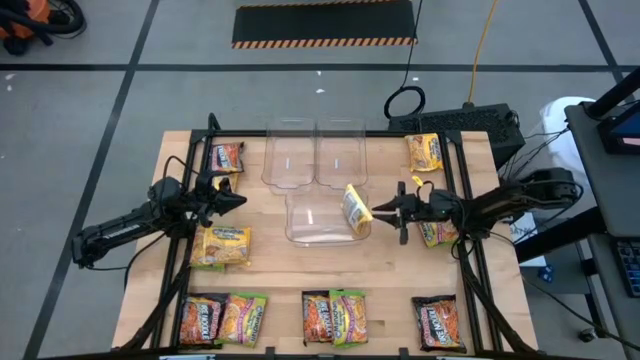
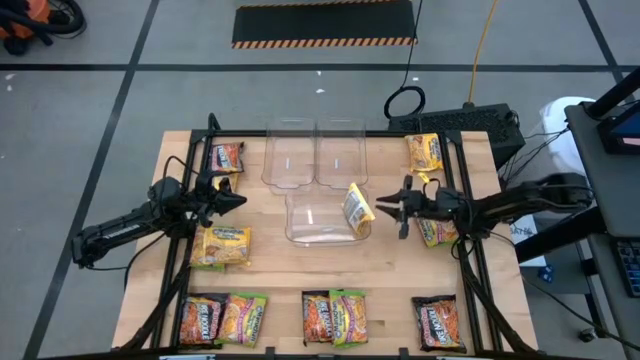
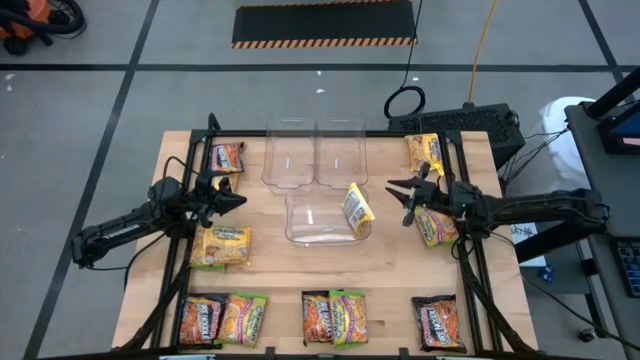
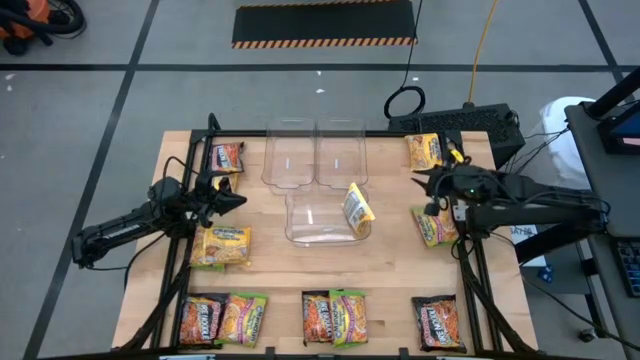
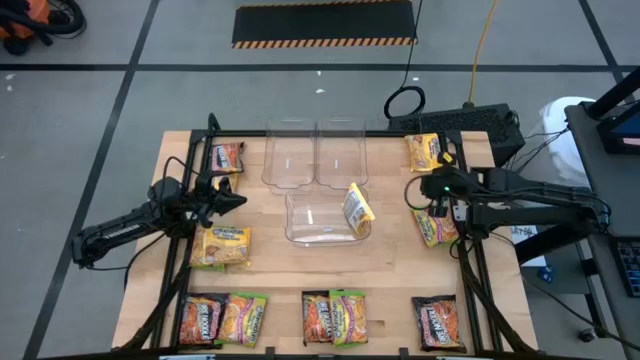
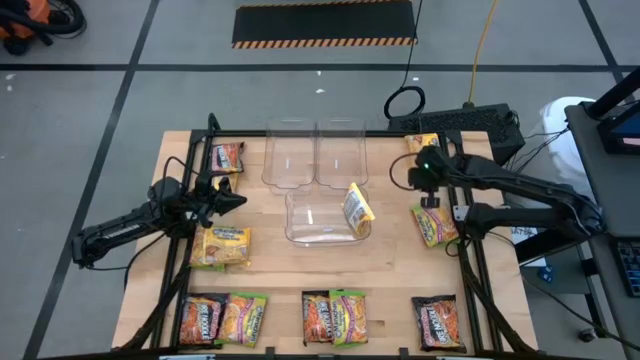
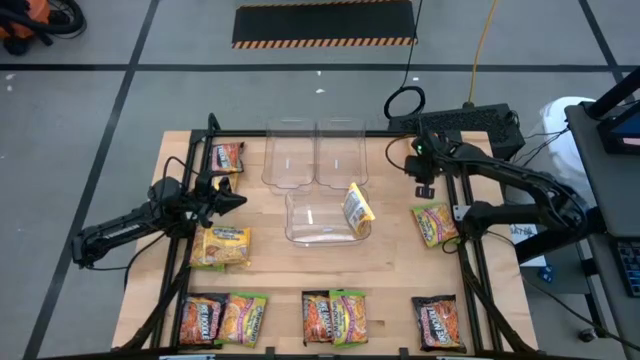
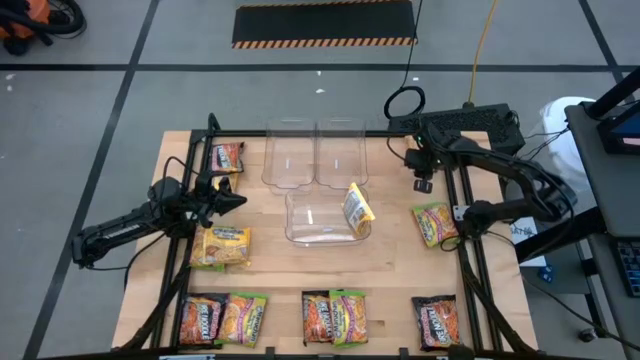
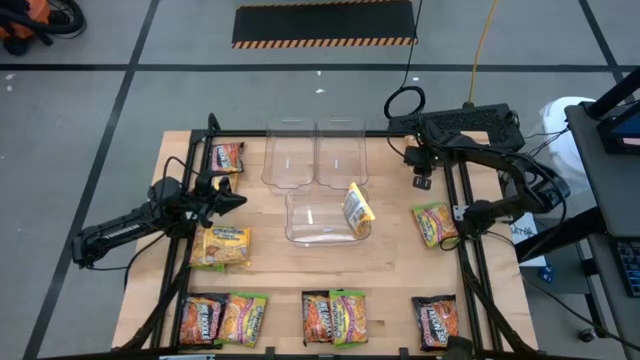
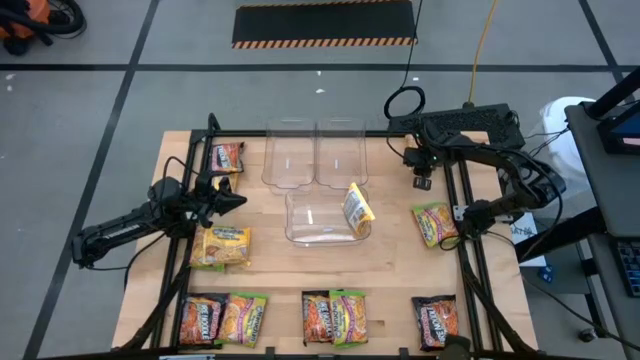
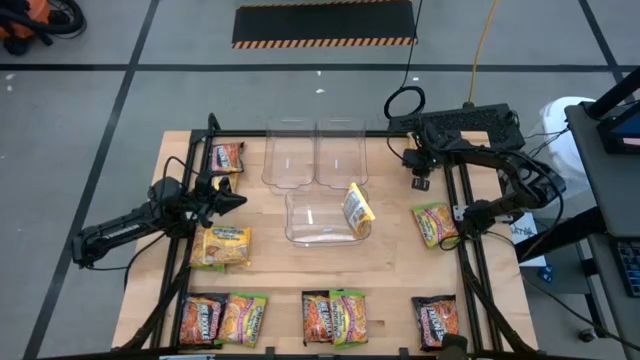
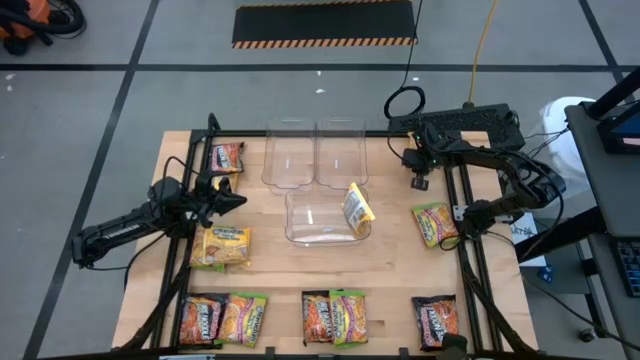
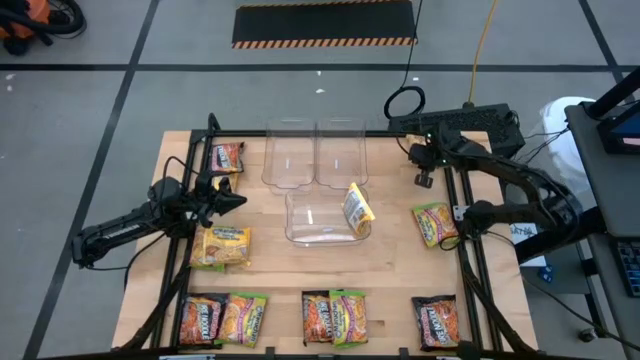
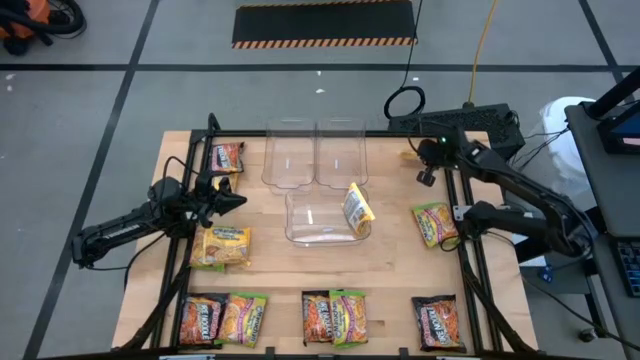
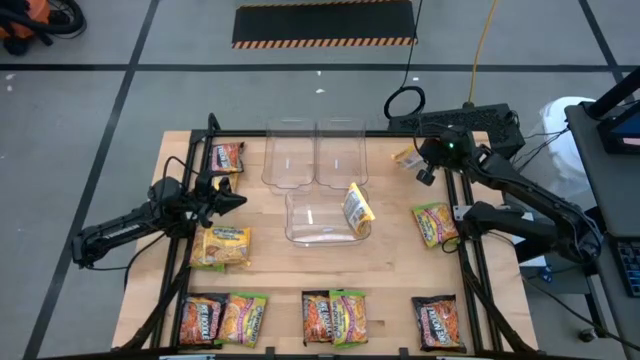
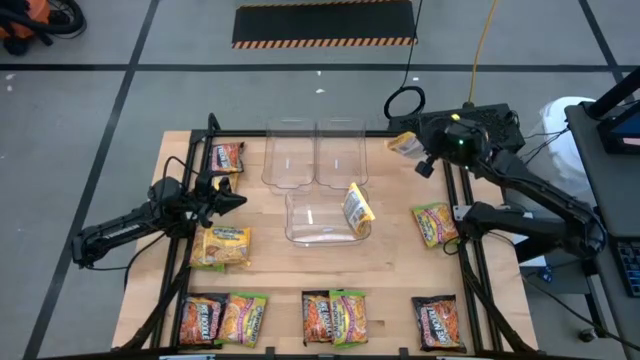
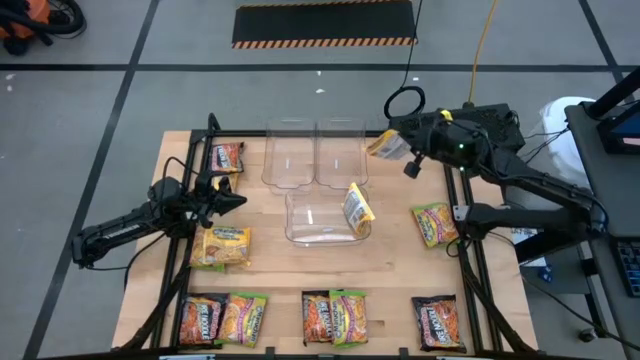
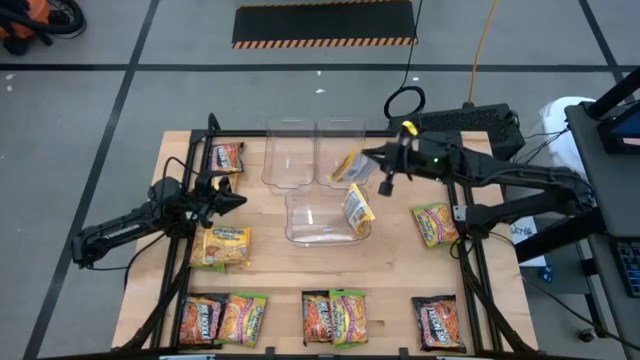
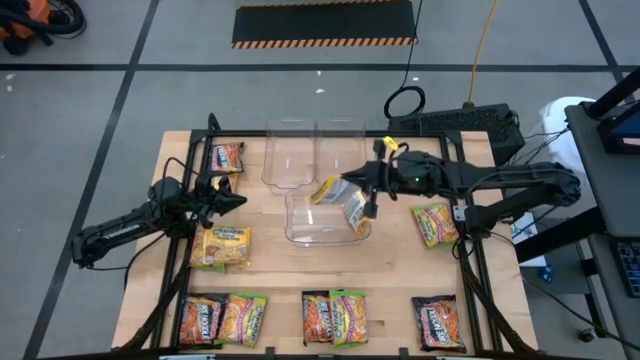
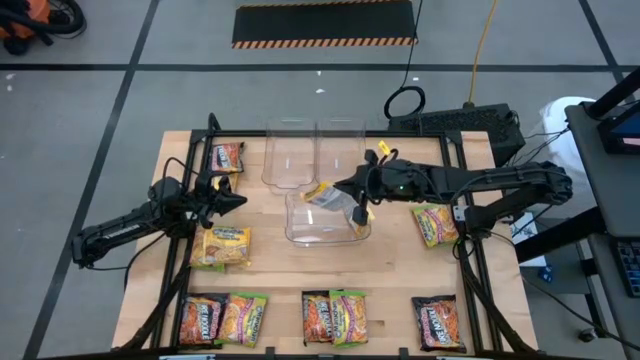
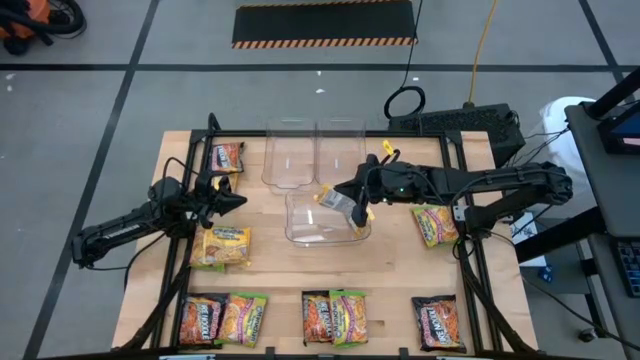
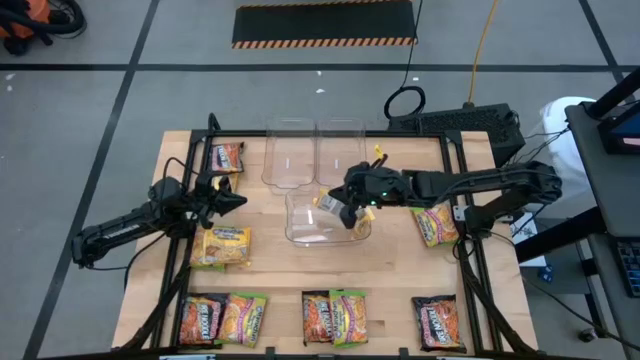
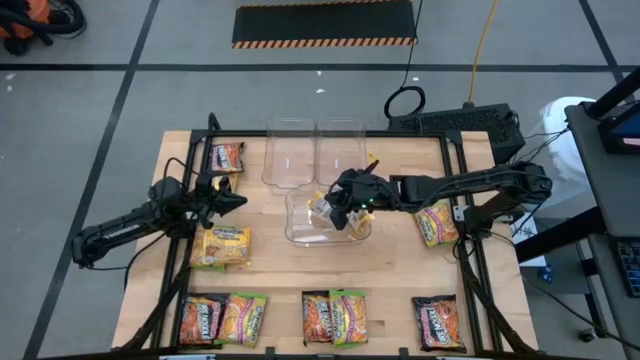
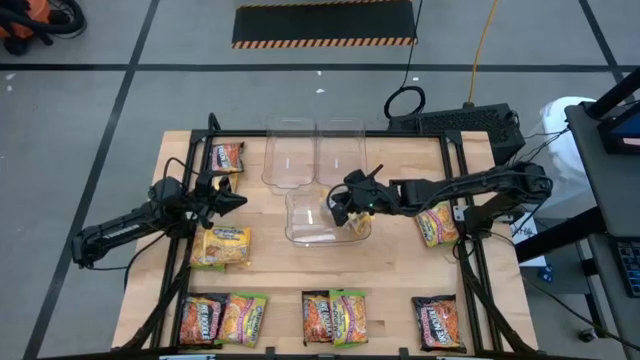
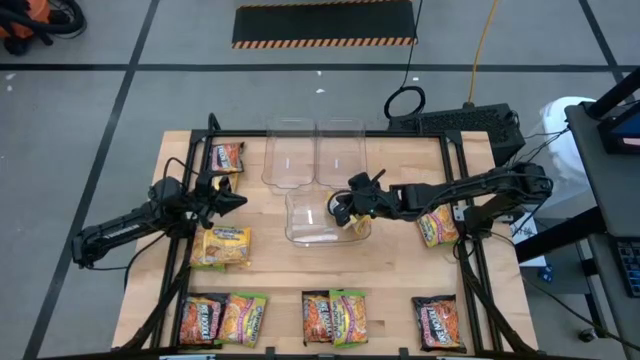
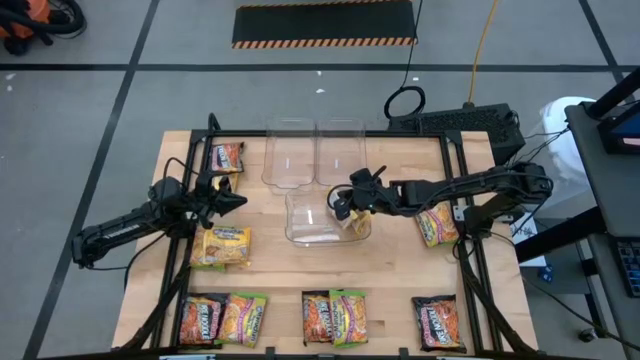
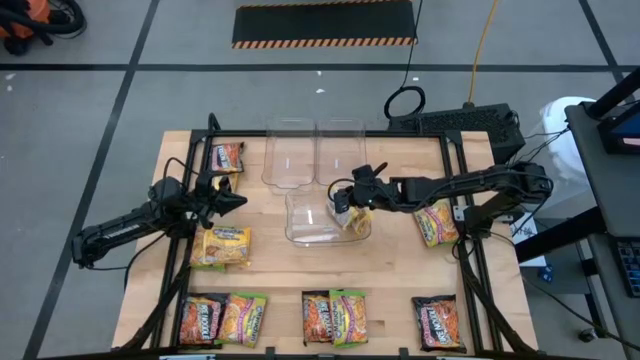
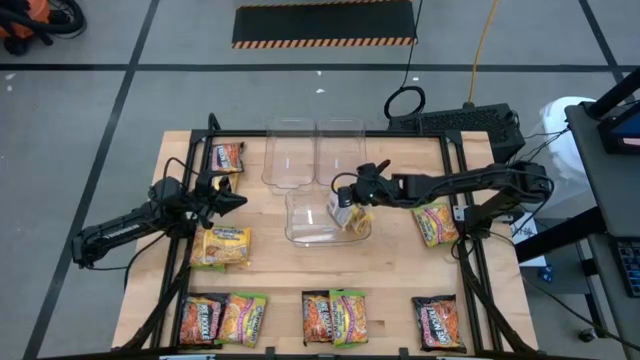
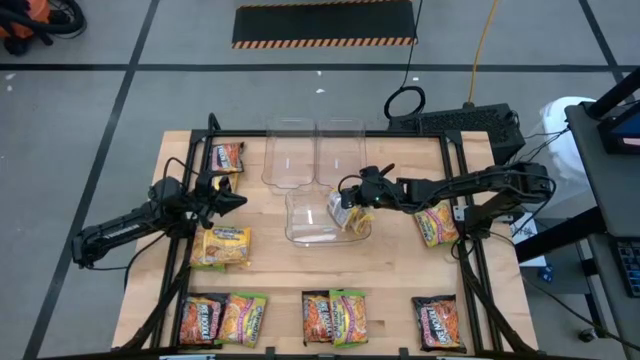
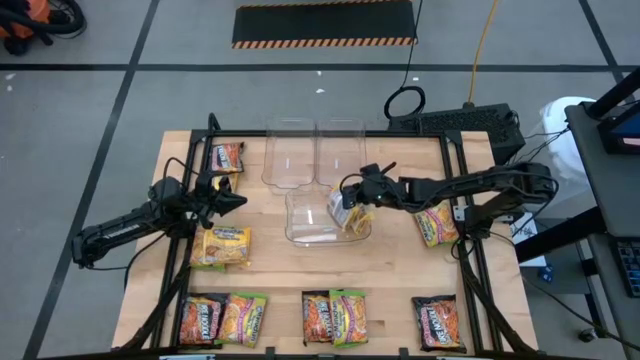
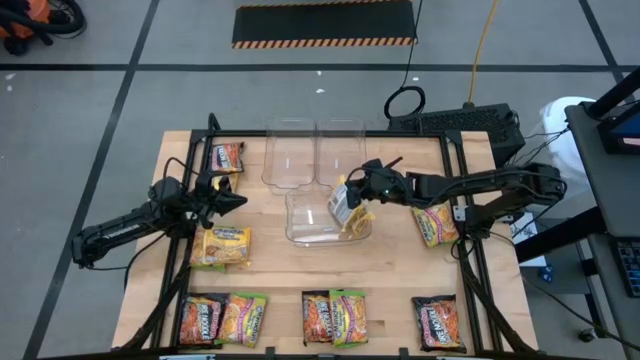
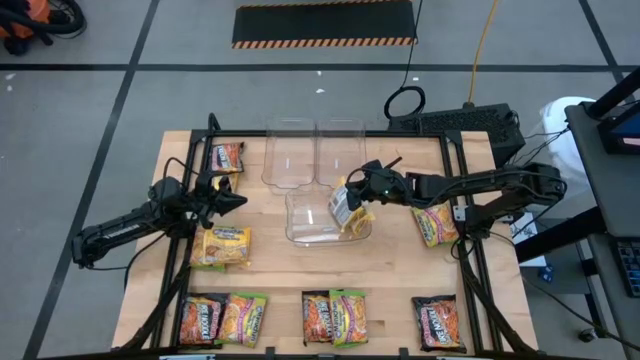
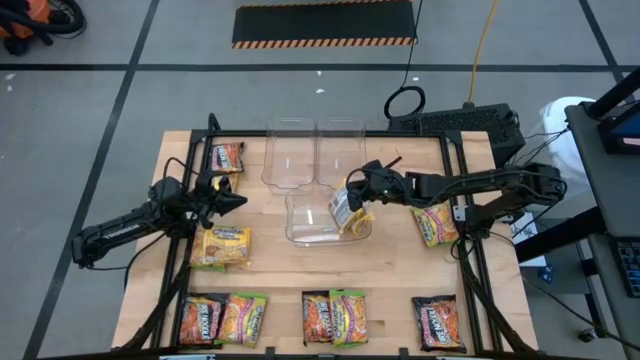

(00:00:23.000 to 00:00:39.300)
Task: Sort Maruchan noodles
Put the yellow noodle pack into the bottom transparent bin
